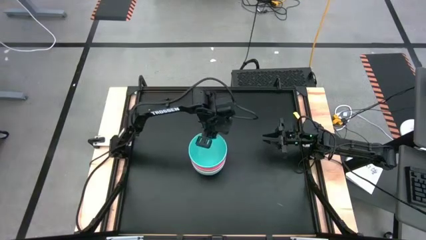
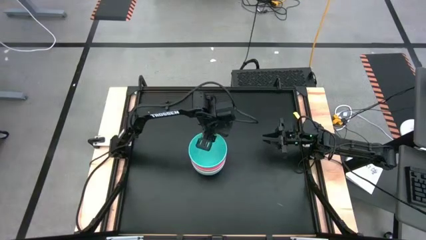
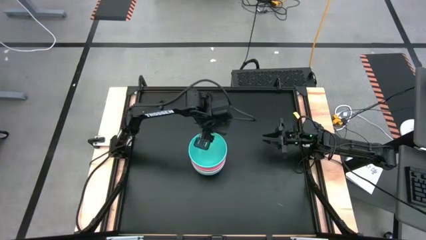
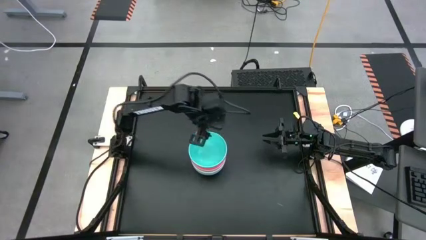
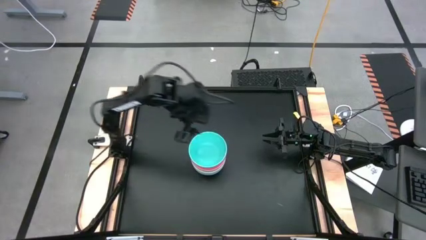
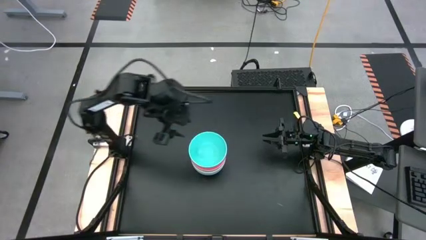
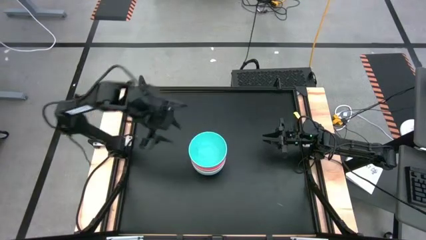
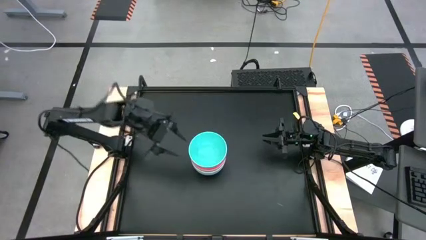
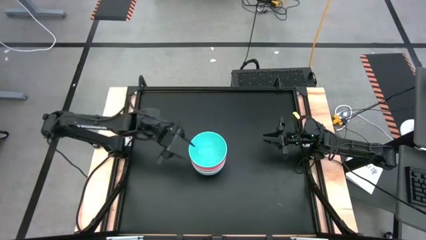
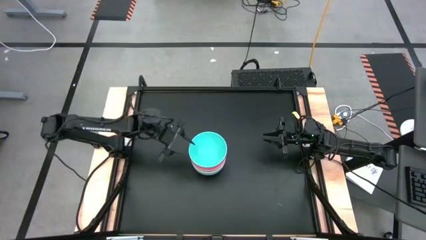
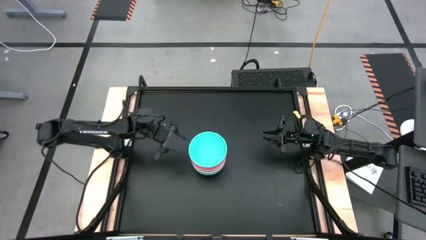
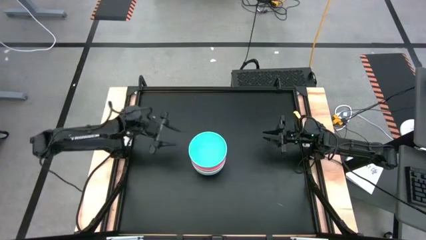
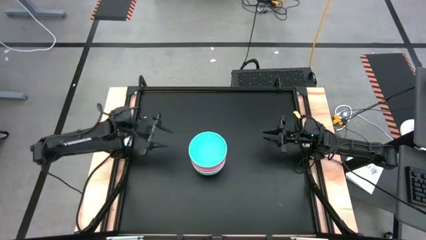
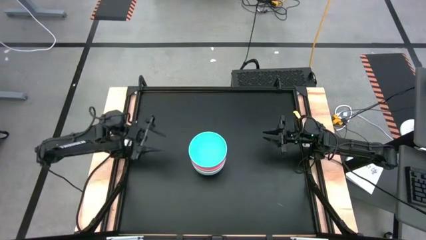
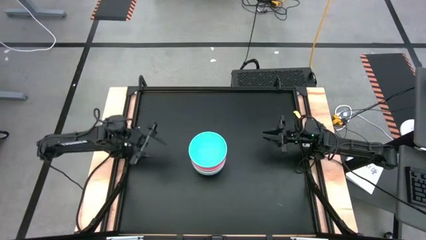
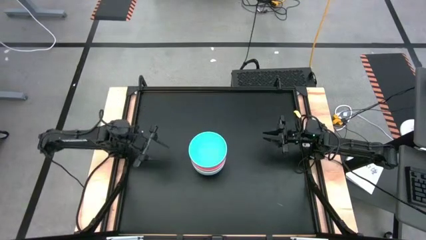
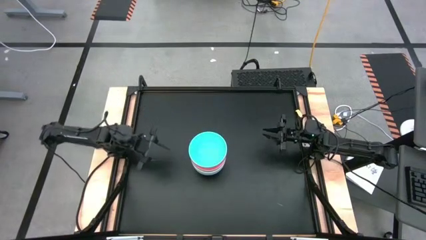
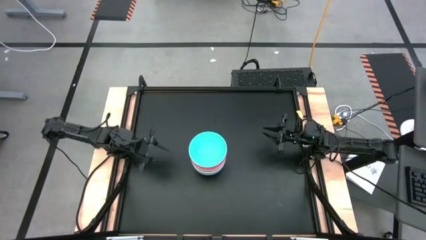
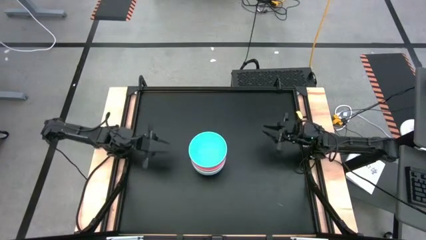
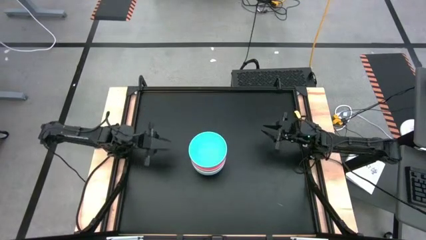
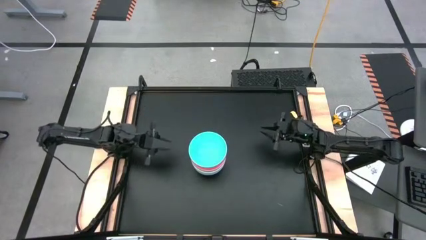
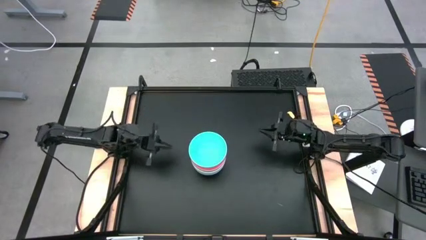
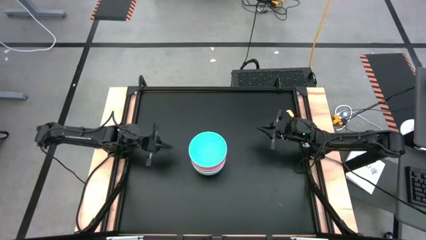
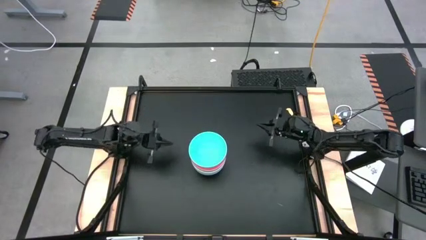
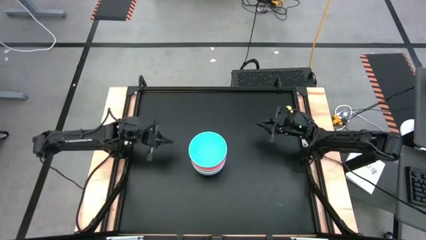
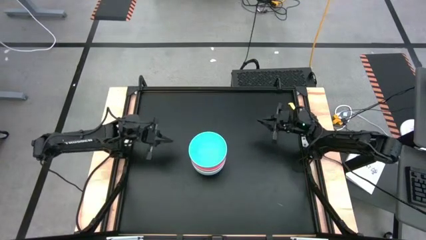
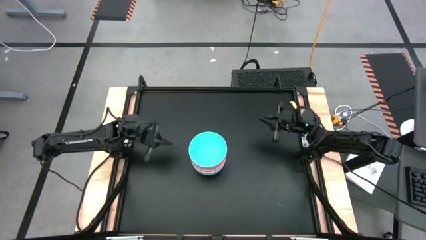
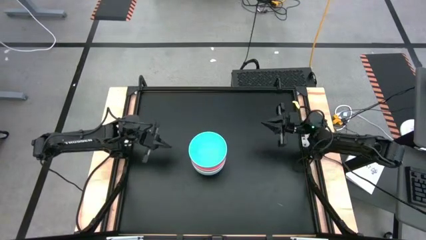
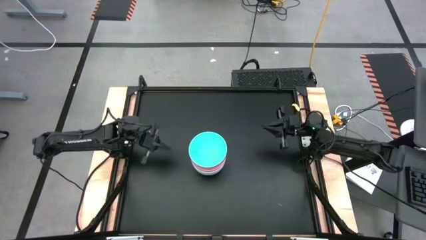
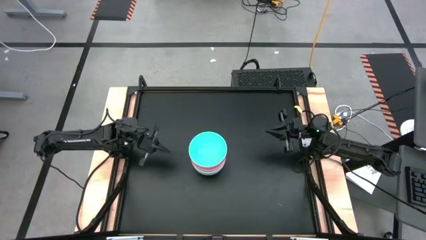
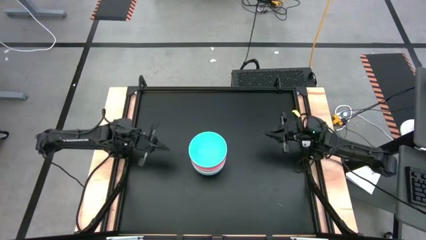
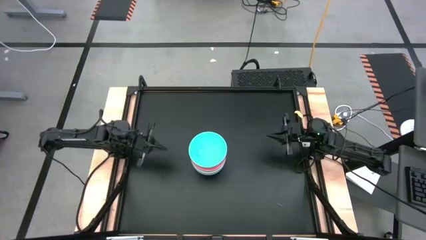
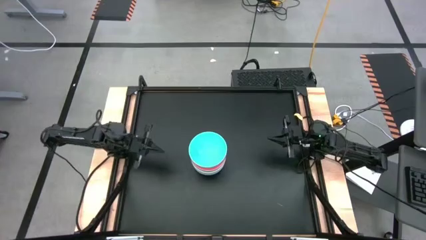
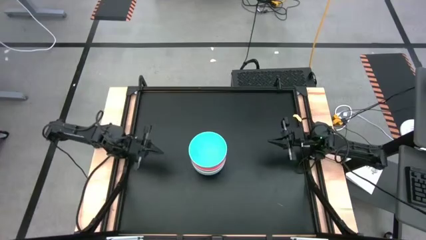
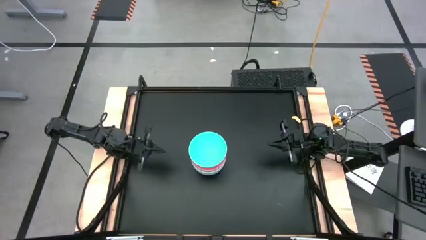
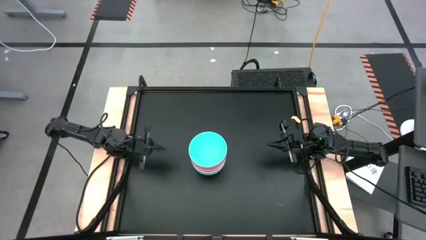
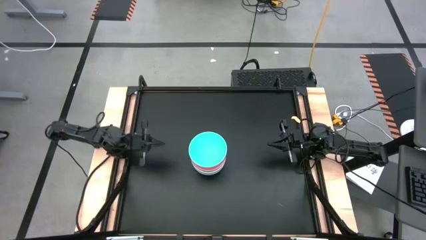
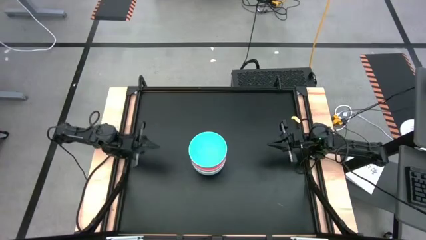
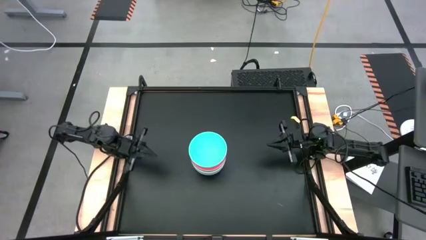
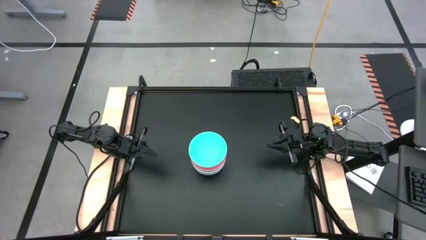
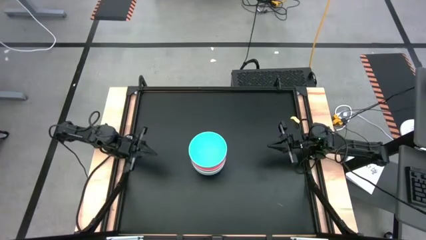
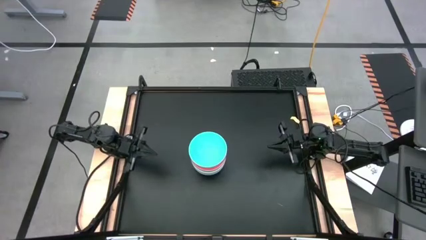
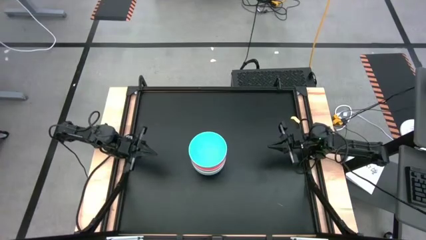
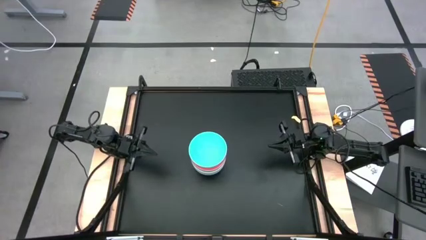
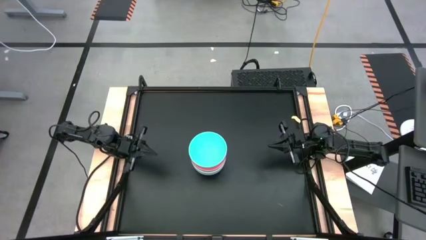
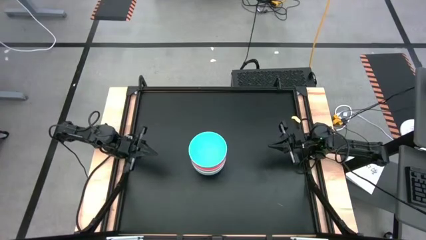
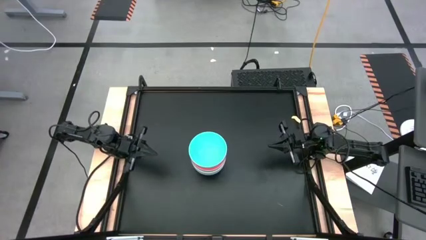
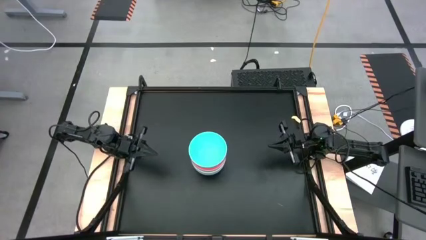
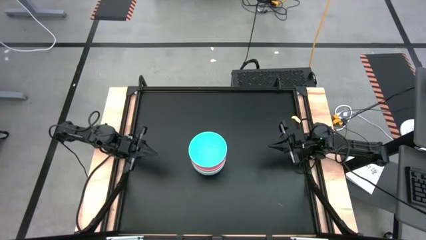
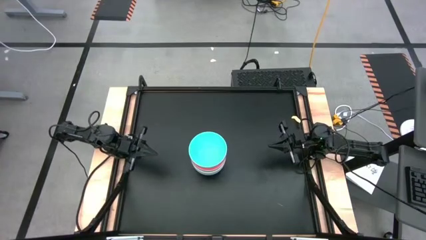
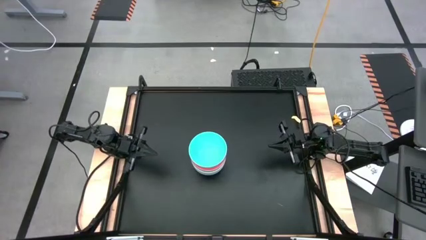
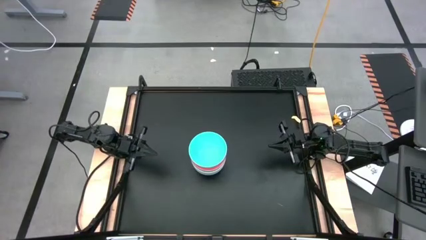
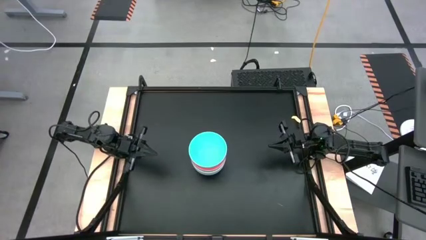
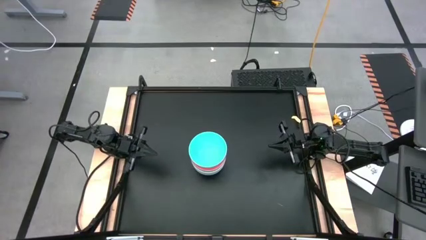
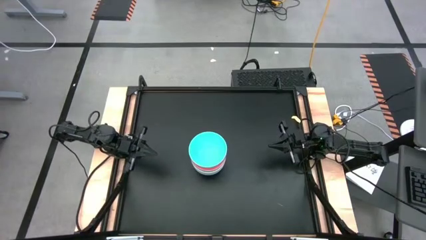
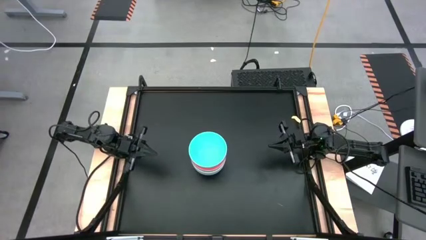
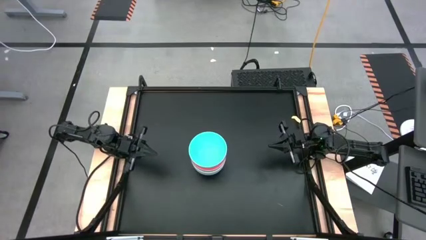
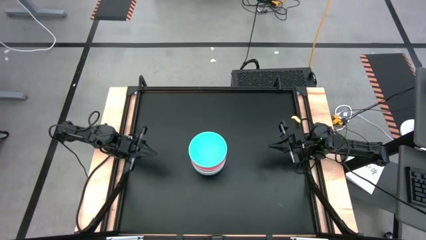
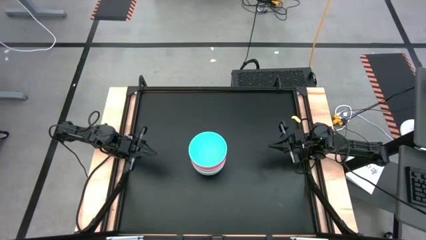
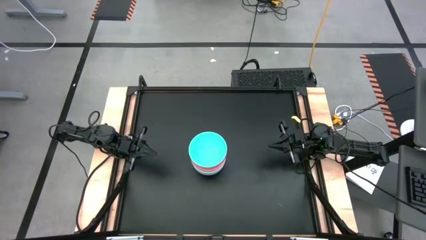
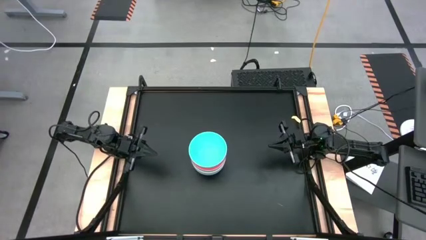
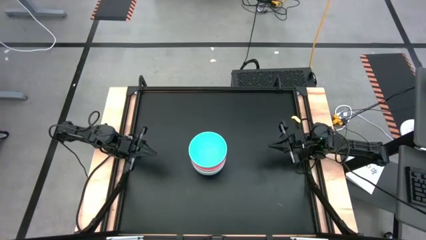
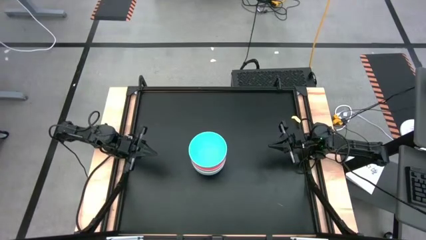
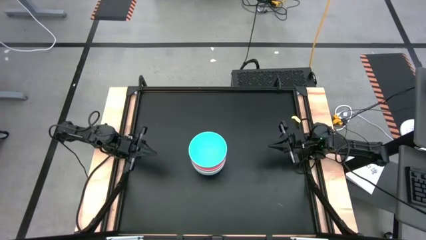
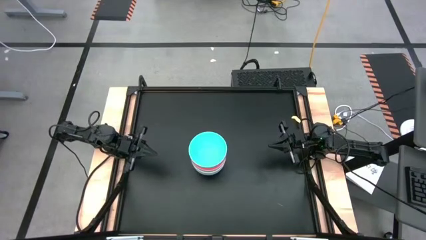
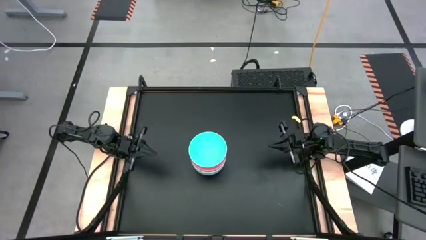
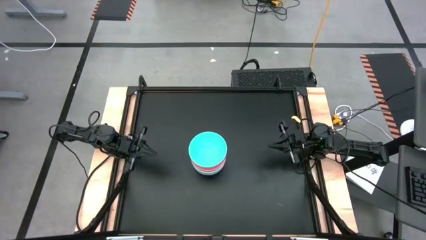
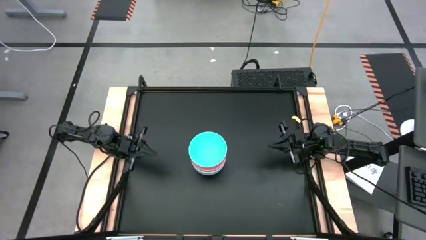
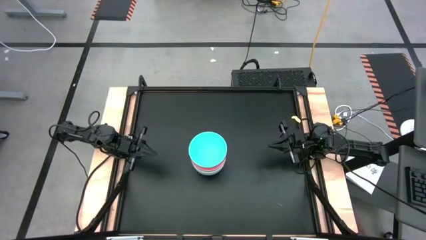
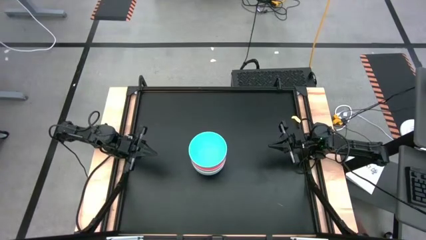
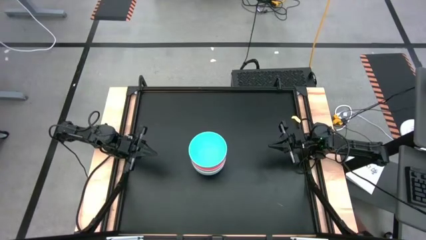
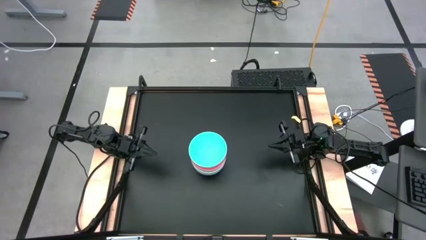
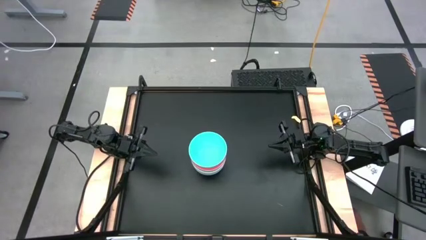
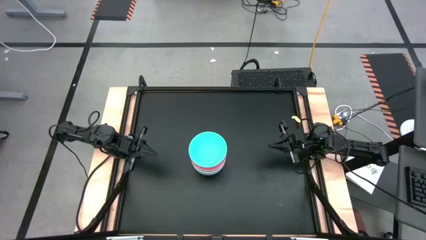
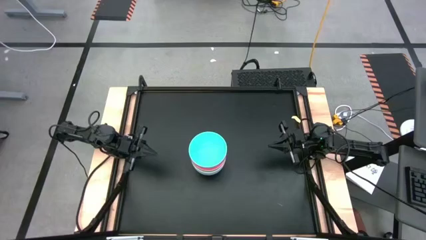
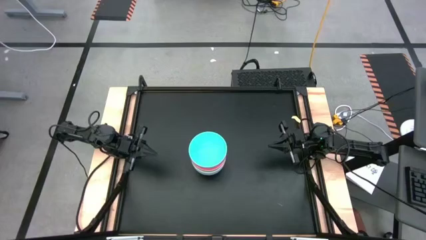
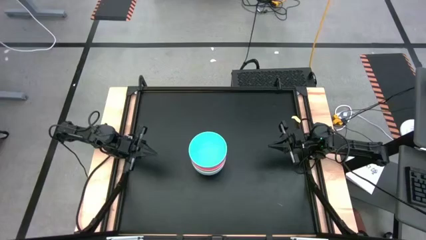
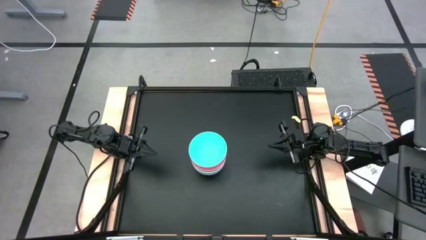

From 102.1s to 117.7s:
Task: Nest bowls inside each other
Return to Home Position

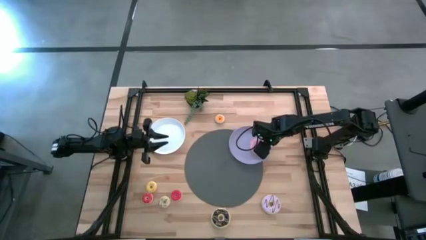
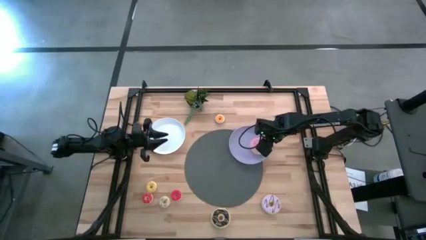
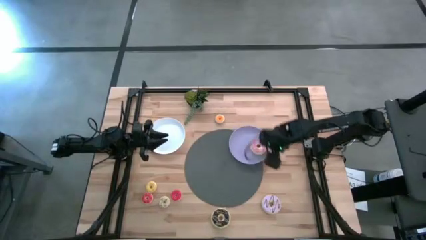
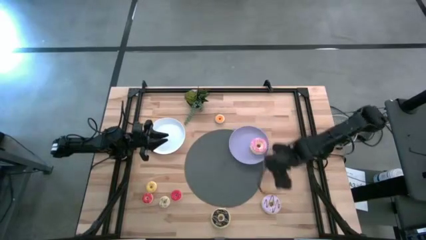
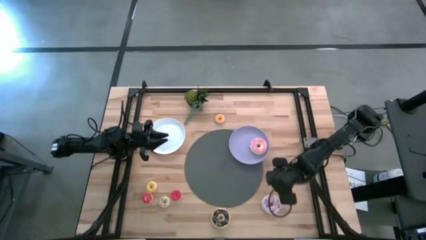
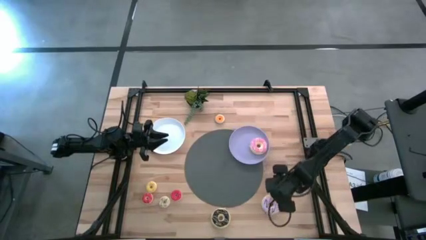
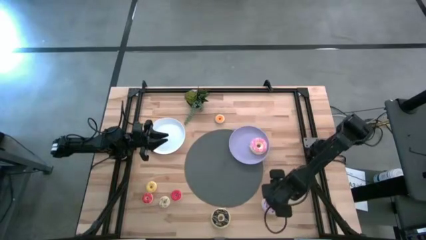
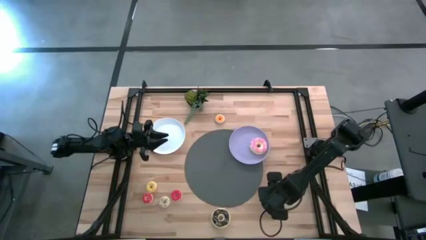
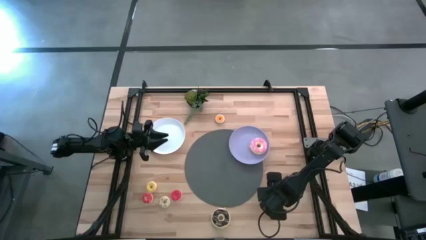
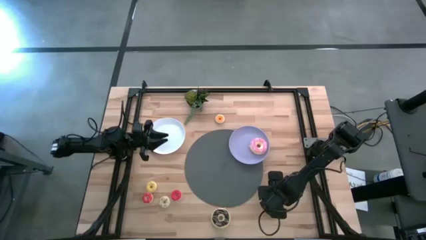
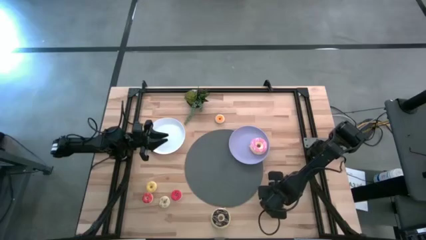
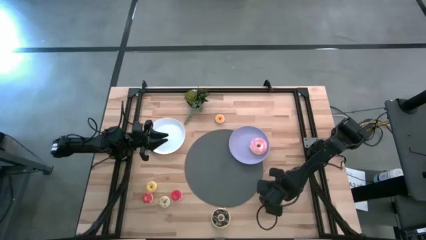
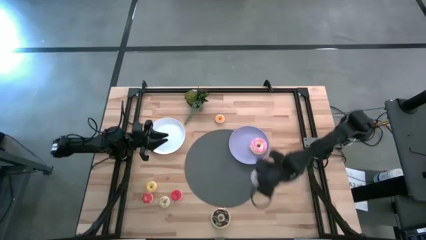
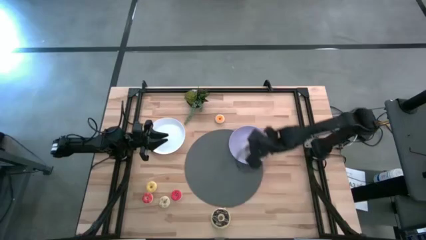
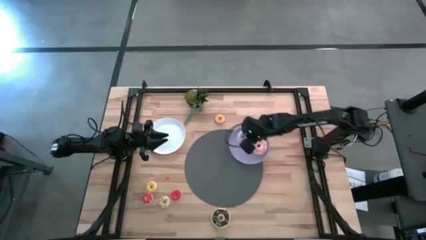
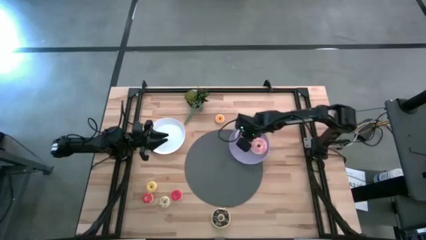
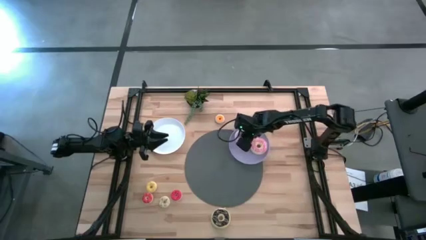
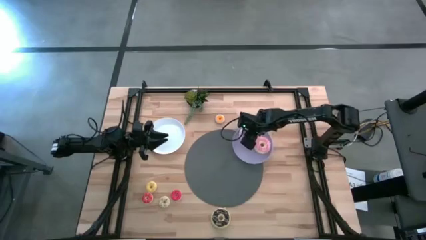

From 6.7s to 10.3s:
Task: Pick & Place donuts
Put the large purple donut on the purple plate
